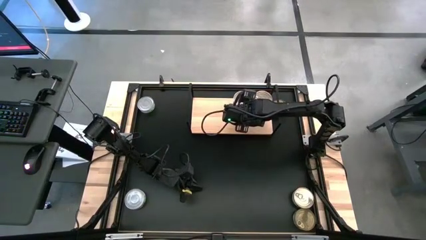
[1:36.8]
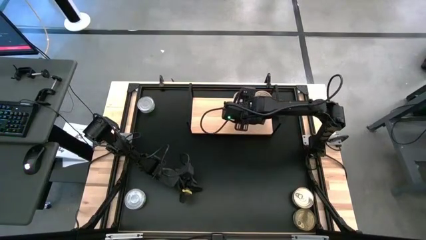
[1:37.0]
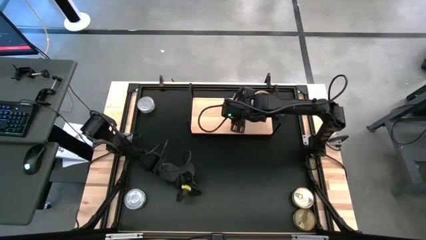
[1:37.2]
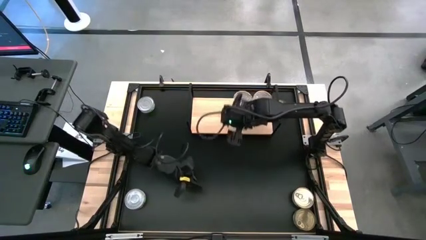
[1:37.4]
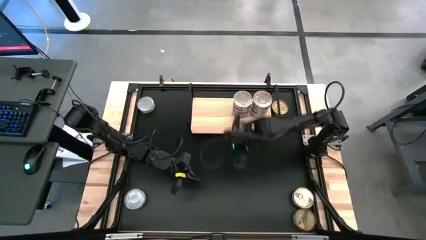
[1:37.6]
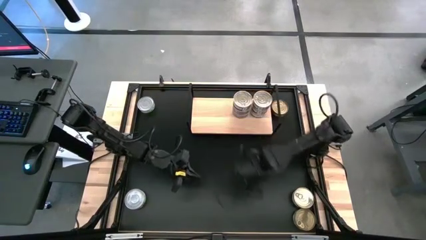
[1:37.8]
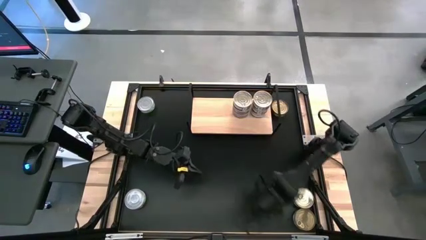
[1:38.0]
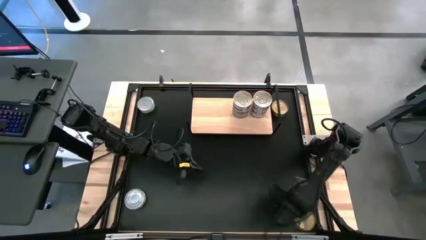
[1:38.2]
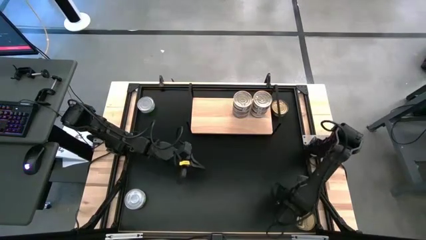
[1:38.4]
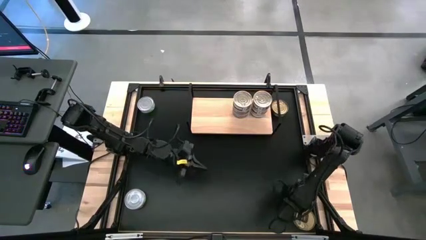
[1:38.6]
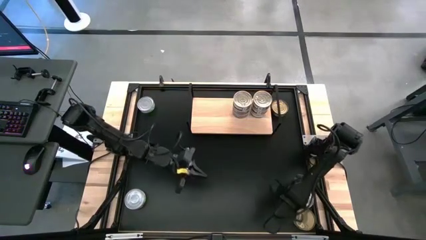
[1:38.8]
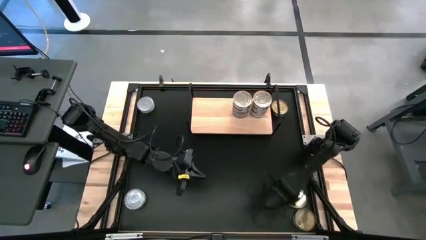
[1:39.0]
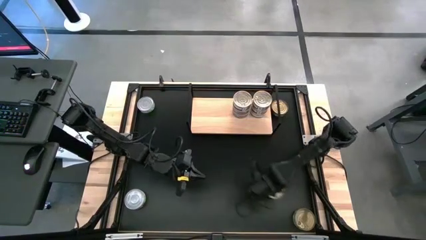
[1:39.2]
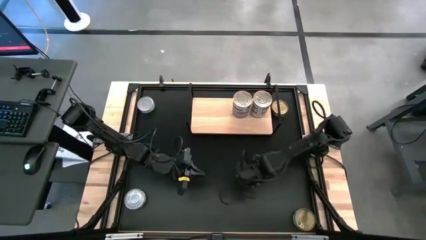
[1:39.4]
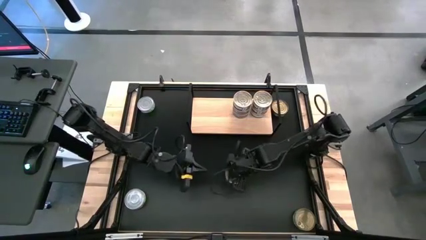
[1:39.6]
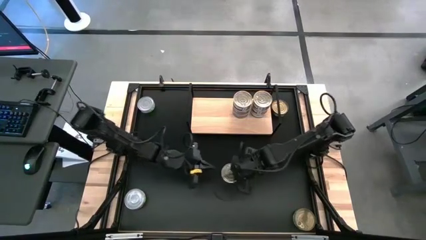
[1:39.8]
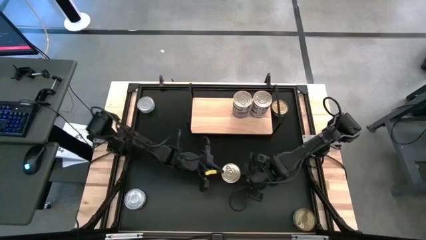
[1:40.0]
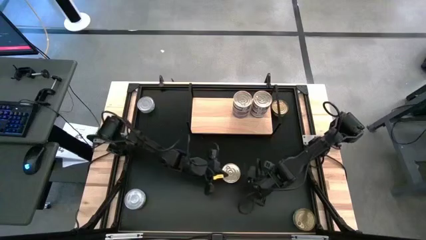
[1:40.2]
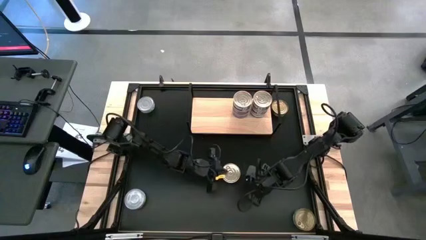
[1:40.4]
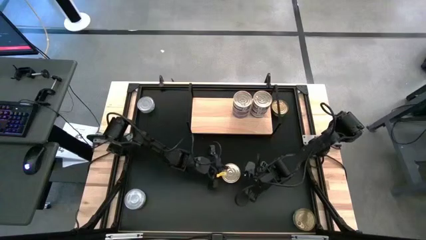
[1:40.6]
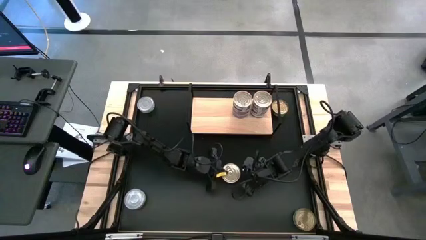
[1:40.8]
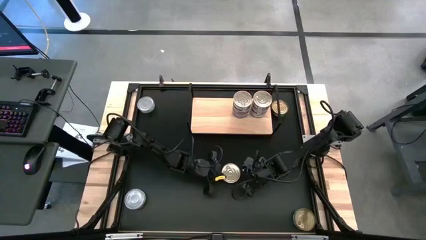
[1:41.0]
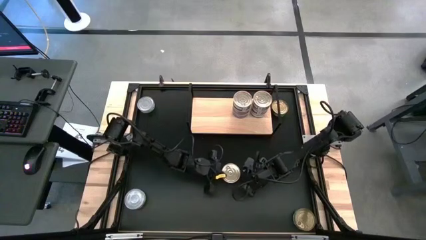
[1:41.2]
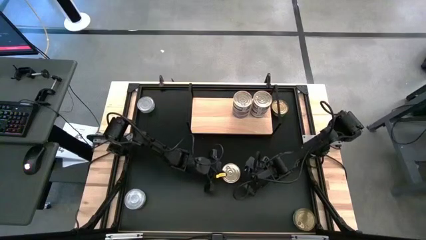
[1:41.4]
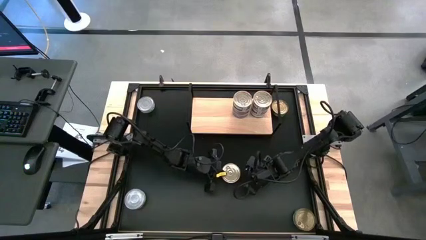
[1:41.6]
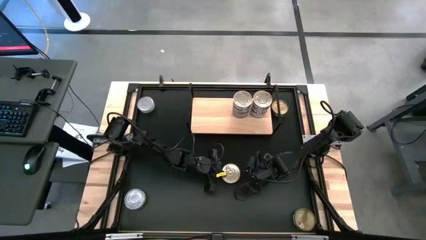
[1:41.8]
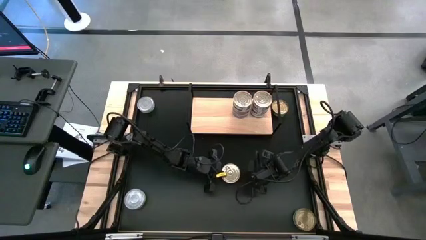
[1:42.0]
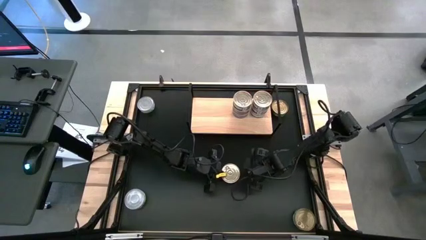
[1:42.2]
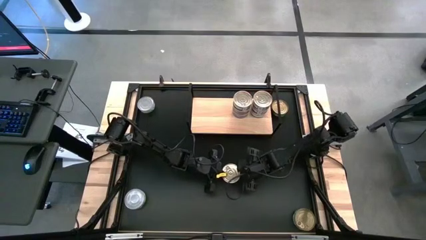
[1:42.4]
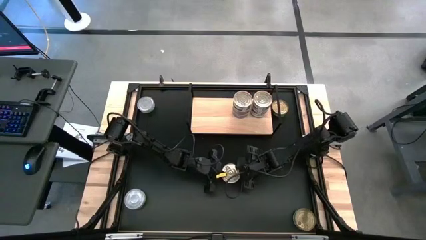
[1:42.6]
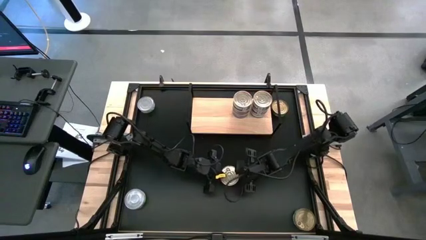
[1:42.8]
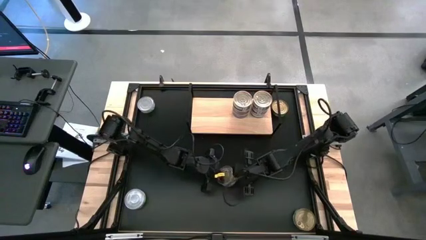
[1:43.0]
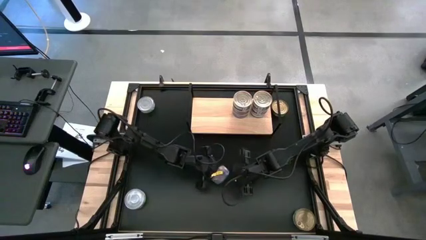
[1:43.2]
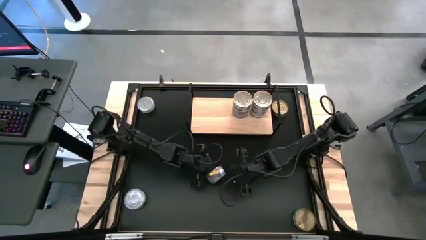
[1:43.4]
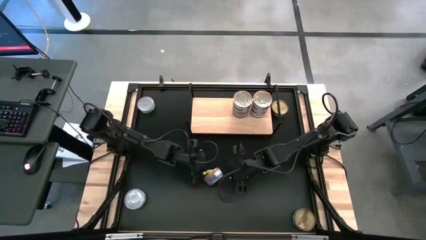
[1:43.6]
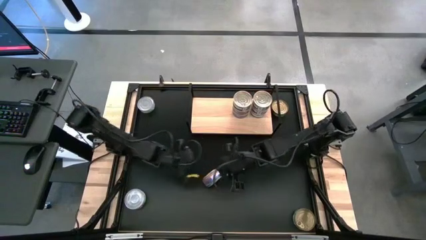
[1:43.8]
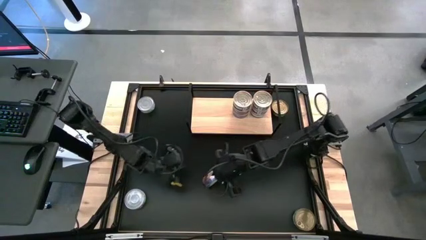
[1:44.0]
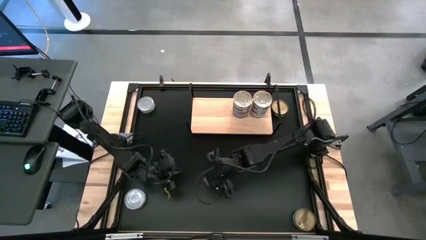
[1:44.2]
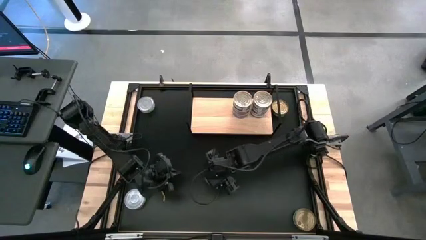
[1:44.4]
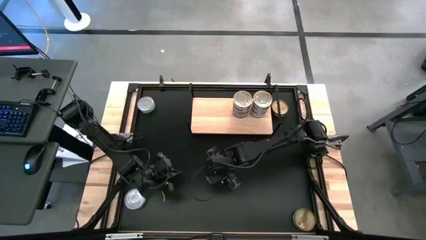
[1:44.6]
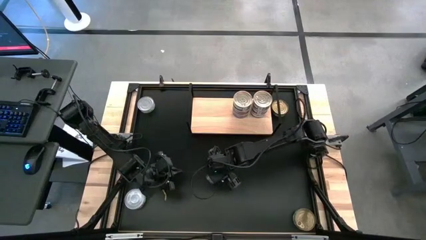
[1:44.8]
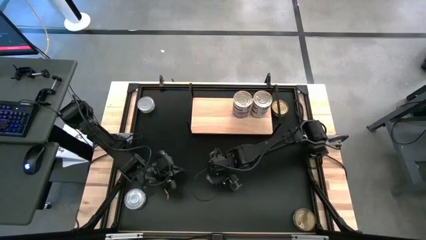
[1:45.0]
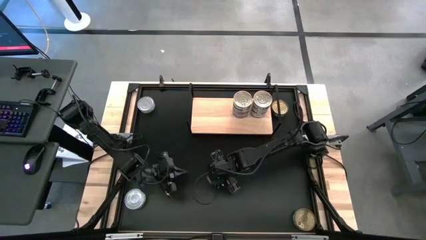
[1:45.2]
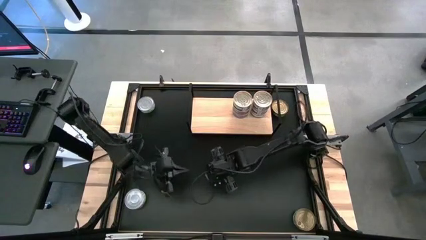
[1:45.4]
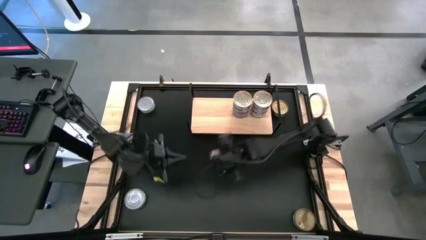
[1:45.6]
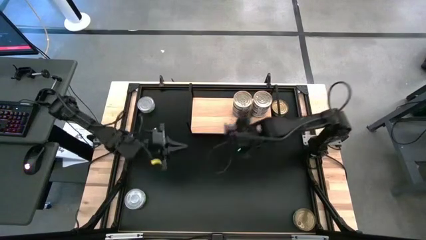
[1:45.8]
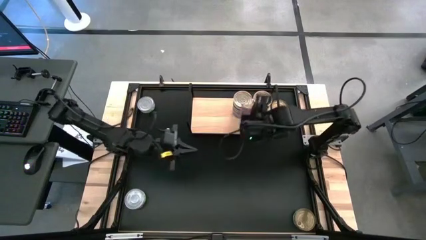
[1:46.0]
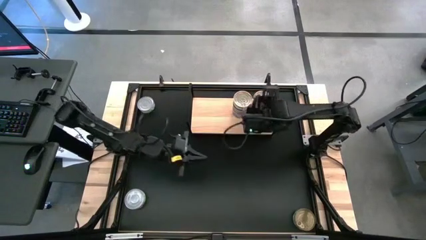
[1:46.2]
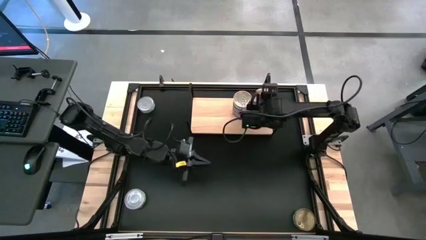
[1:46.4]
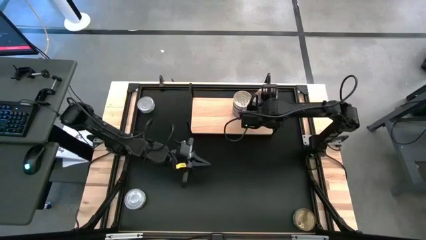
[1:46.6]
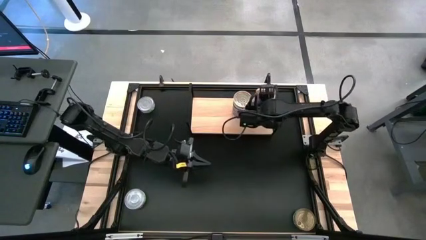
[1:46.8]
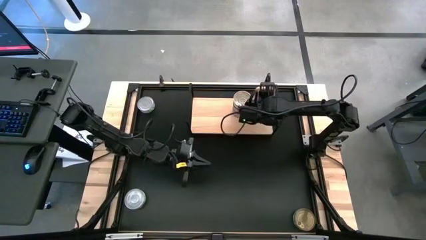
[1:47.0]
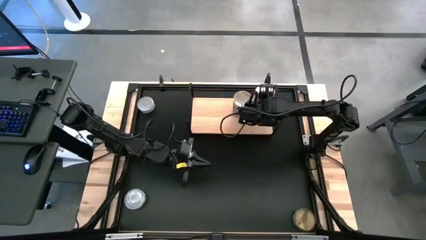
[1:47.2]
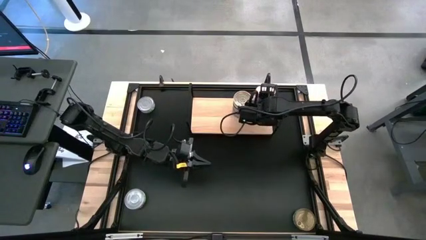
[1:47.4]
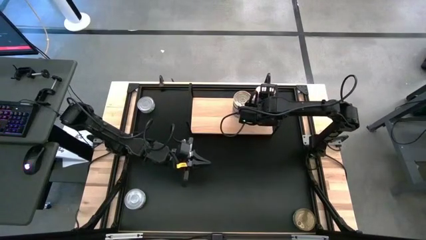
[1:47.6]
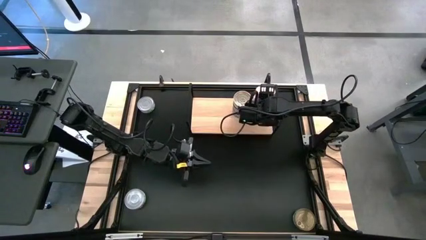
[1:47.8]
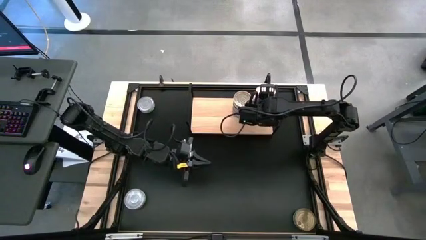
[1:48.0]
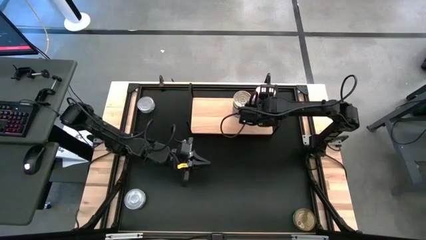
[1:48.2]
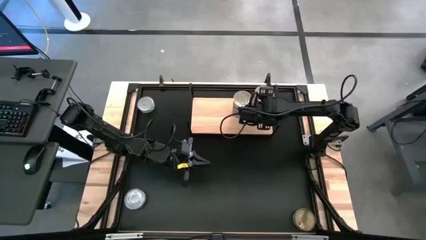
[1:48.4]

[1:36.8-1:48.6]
Task: Stack canned seafood by type on shelf
Stack the blue-pink tuna can on top of the other blue-pink tuna can on the shelf

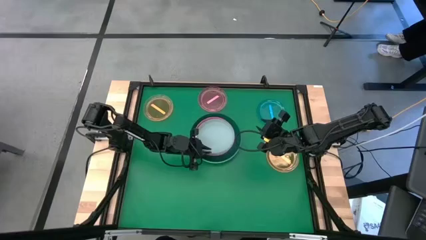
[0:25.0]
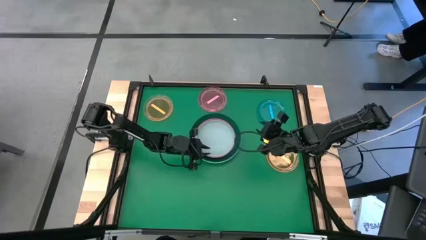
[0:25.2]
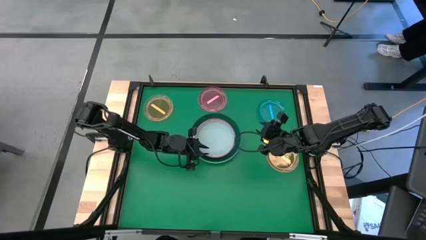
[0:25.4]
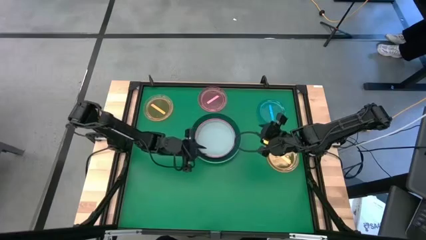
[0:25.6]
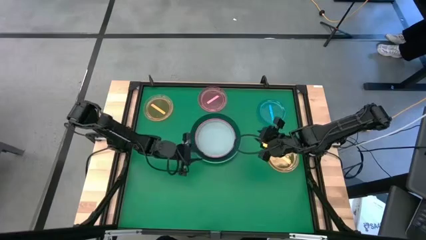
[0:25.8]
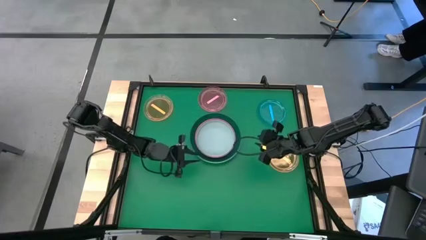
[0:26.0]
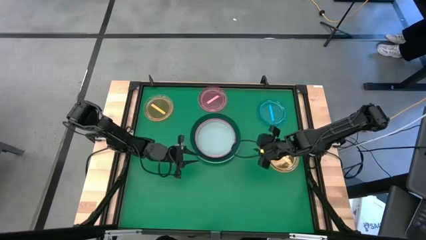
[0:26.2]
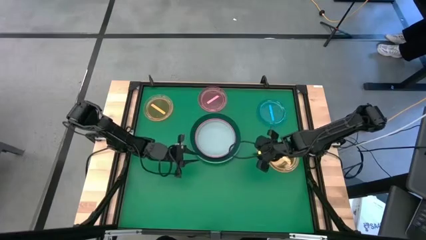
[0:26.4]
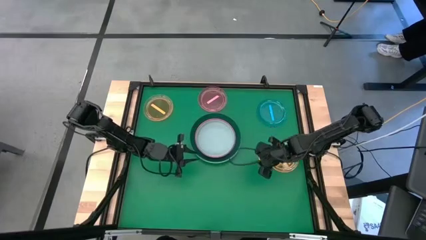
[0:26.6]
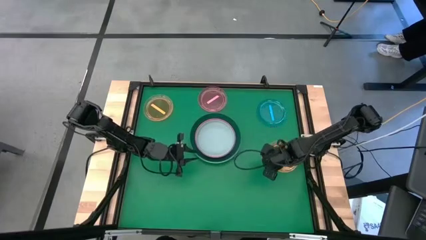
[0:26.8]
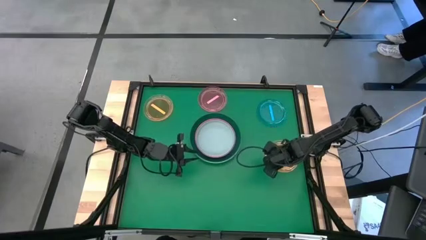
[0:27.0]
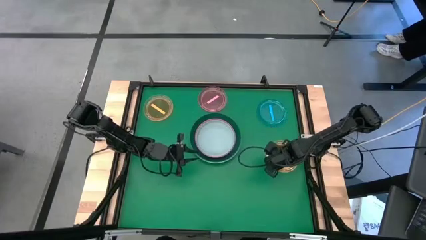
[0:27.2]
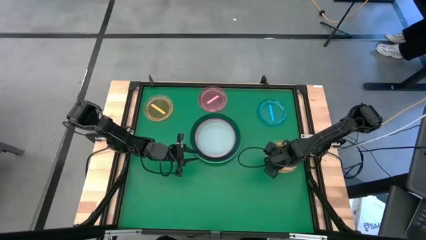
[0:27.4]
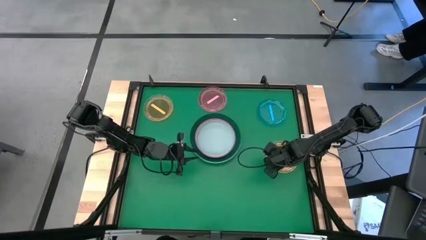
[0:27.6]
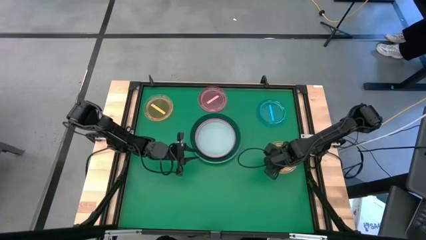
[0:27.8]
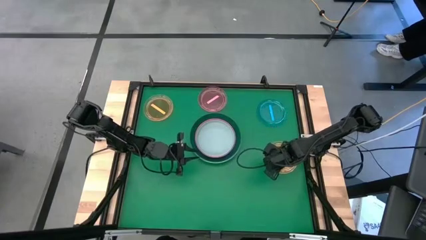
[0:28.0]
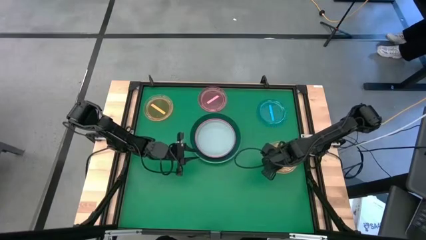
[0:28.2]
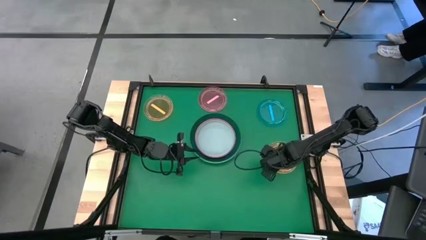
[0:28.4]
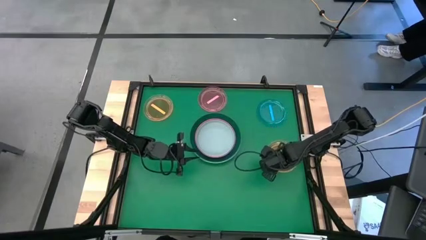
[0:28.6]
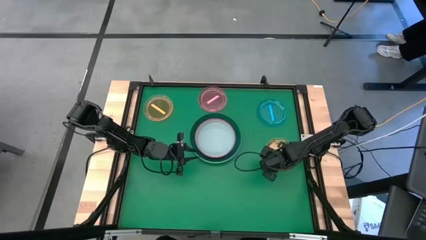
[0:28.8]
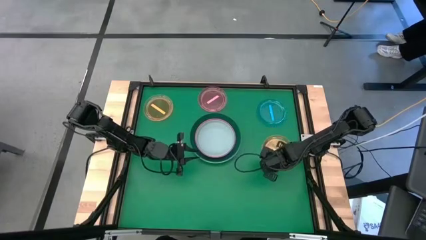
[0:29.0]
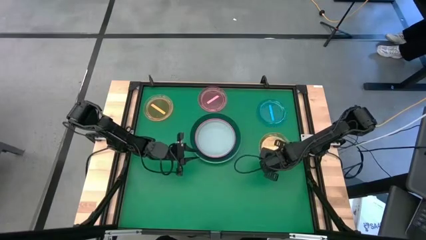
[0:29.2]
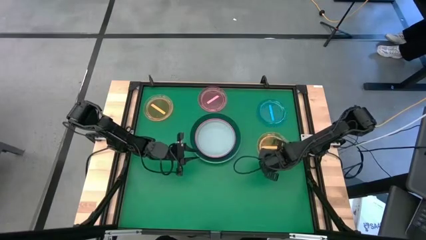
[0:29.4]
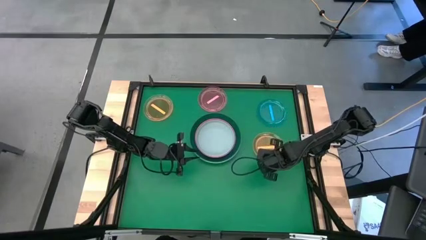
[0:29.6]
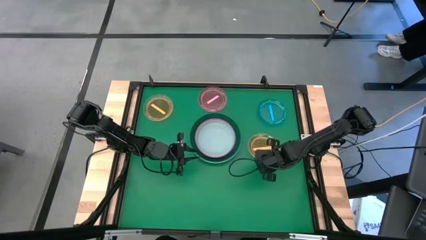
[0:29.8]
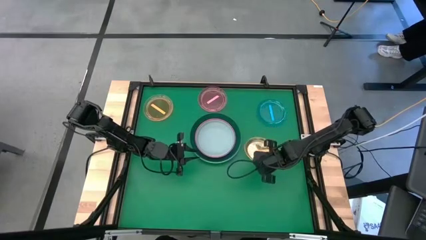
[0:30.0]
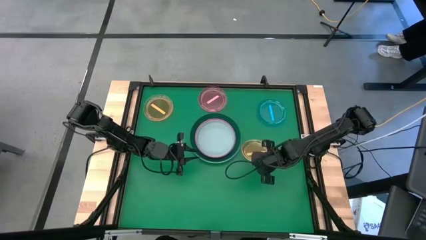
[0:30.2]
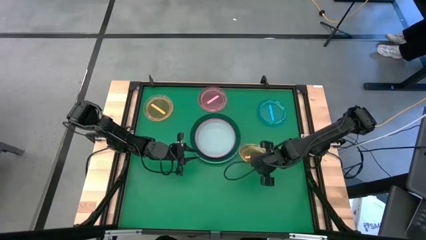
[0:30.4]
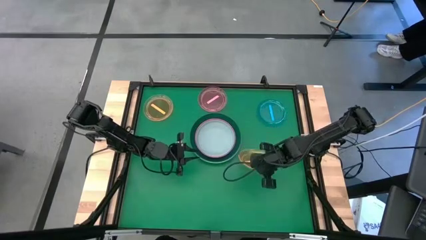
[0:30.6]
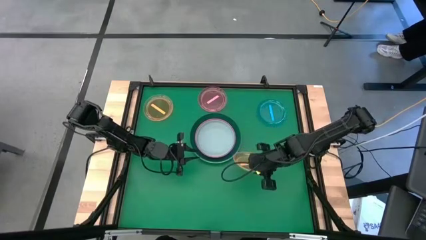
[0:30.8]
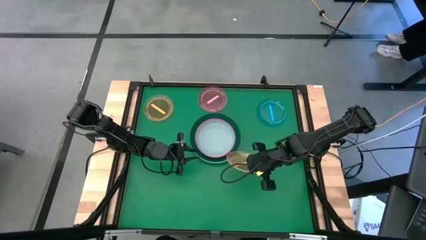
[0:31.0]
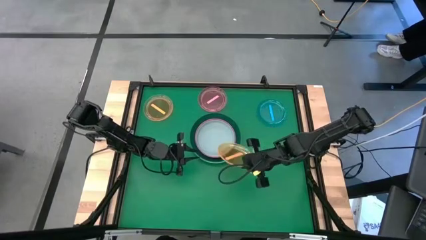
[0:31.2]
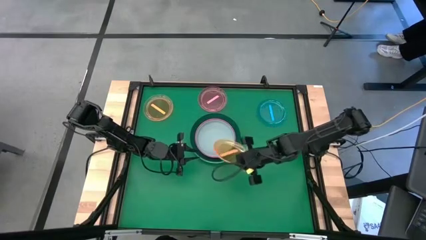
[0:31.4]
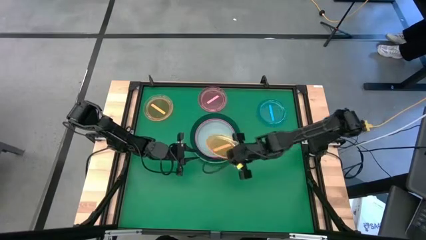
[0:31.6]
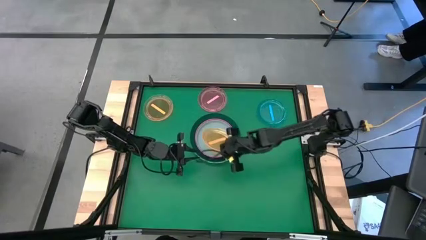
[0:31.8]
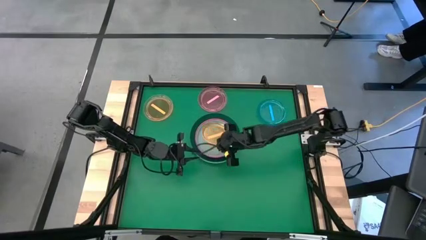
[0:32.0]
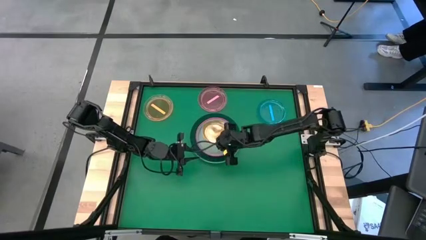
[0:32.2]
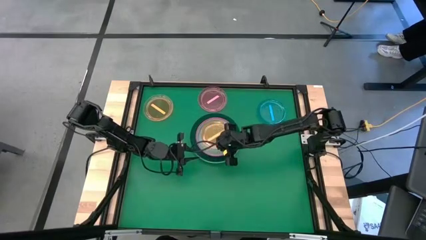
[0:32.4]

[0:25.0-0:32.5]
Task: Stack plastic plates
Stack the bottom yellow transparent plate on the gray plate
